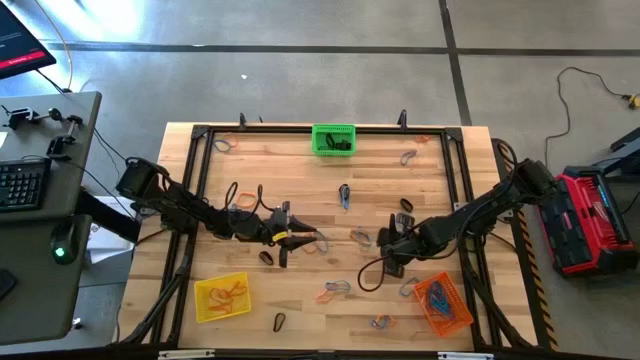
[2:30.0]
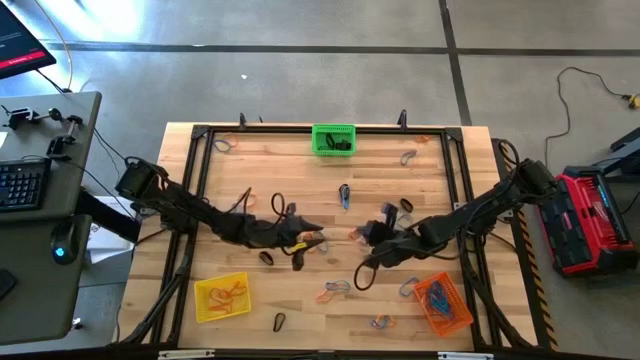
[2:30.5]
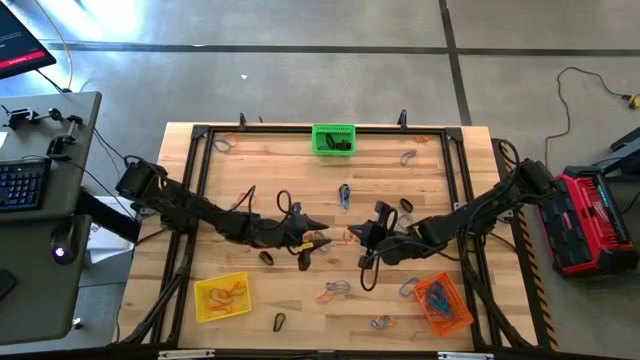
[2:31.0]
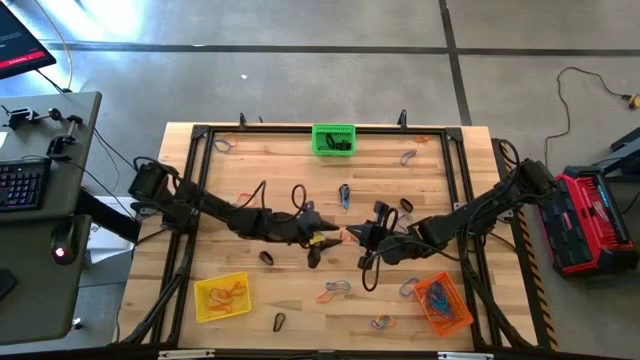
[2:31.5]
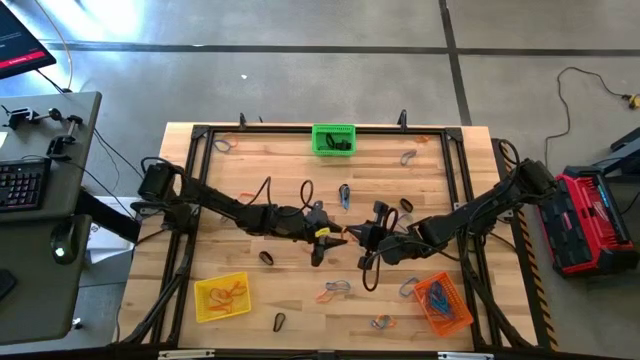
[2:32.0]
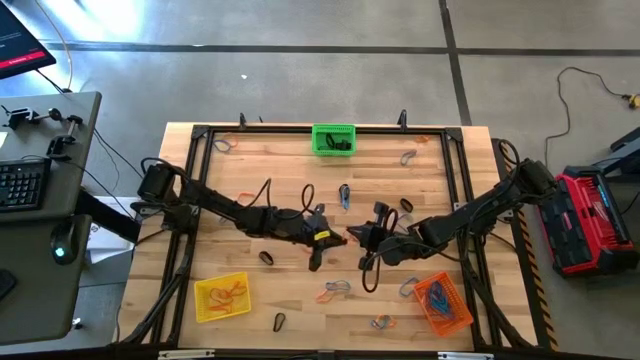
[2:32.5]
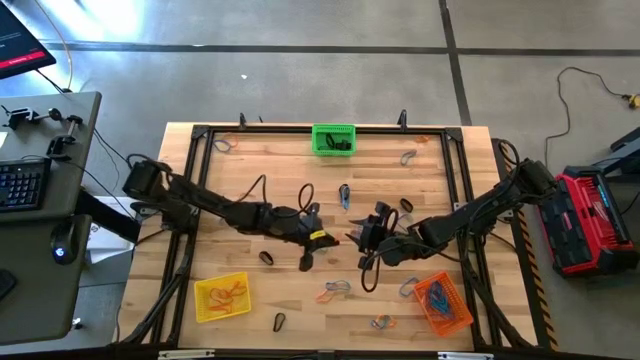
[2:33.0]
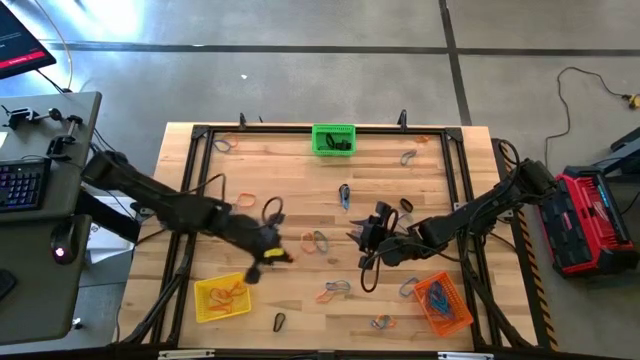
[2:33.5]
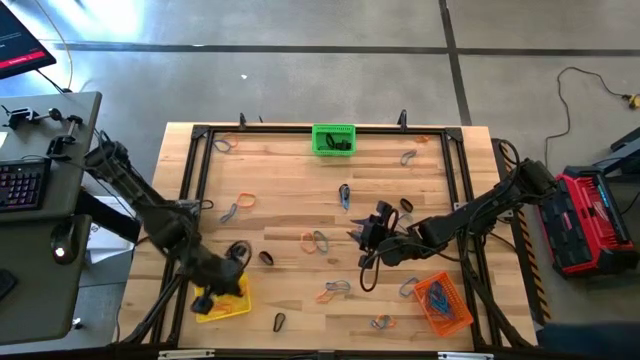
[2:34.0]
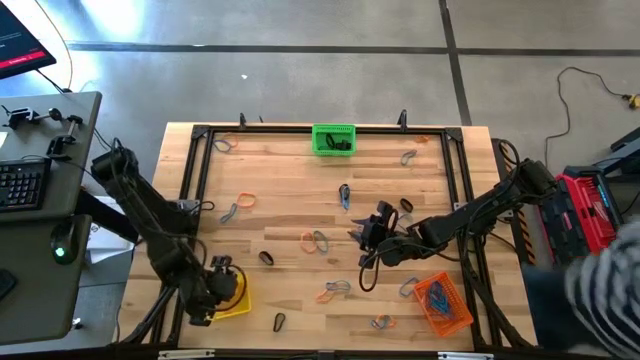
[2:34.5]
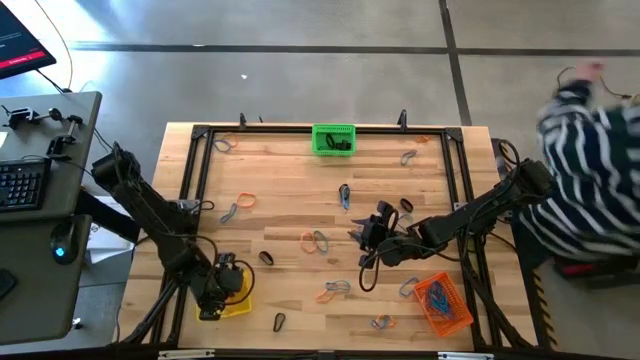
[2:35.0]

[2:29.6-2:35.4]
Task: Sort rubber bands into baskets
Put the orange rubber band into the yellow bin

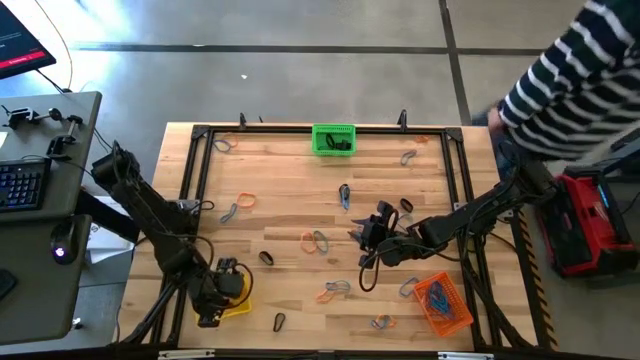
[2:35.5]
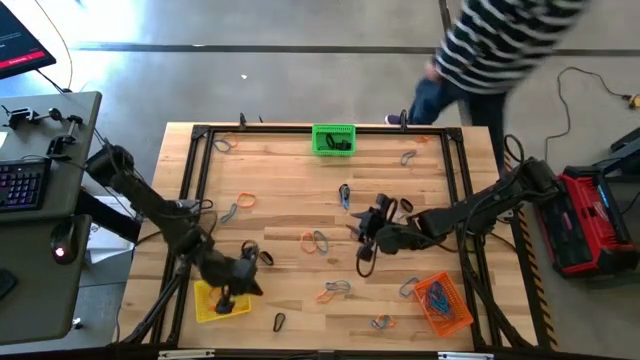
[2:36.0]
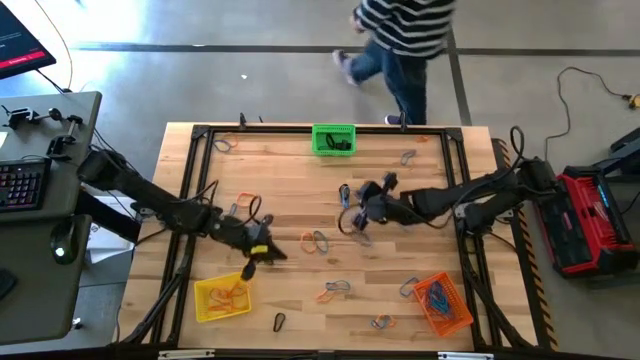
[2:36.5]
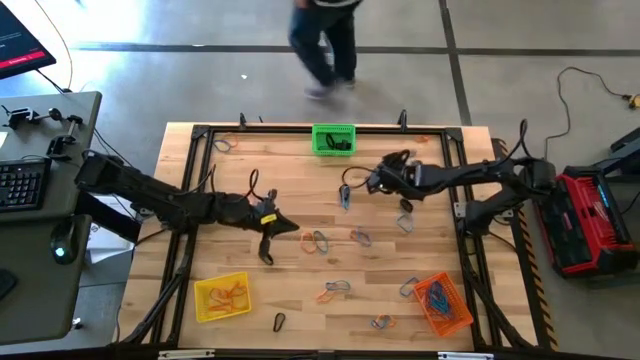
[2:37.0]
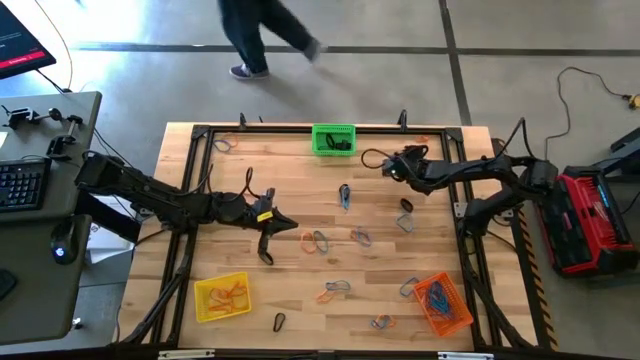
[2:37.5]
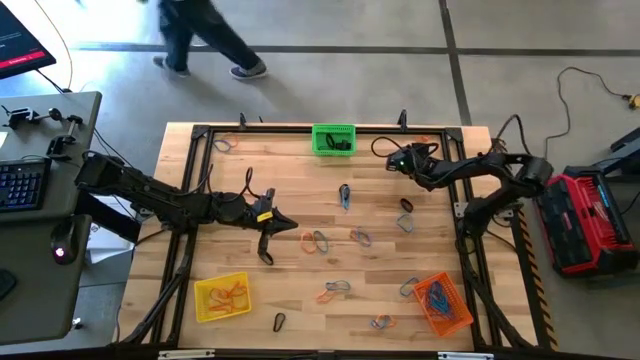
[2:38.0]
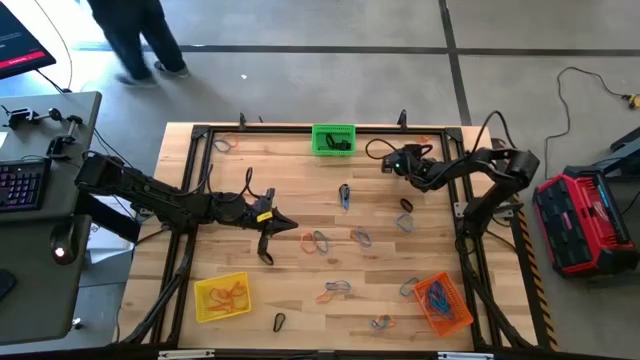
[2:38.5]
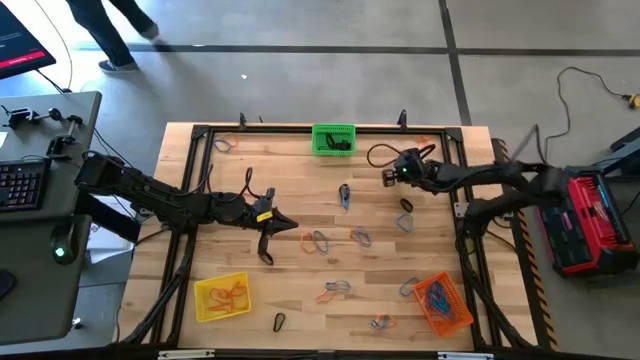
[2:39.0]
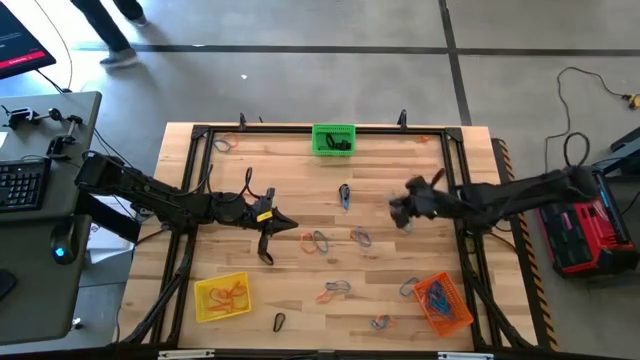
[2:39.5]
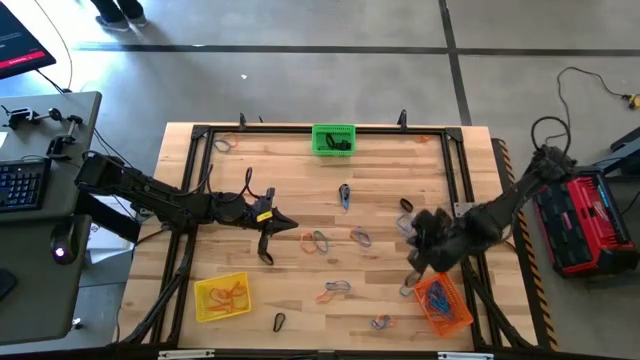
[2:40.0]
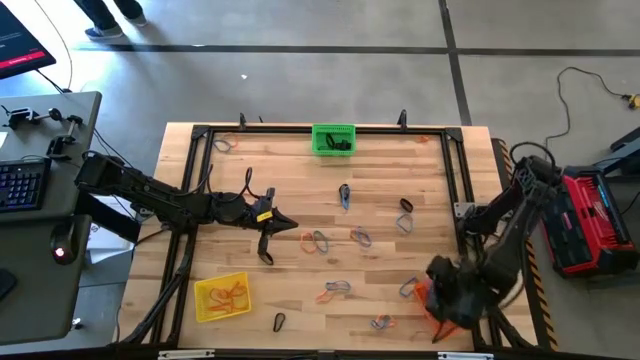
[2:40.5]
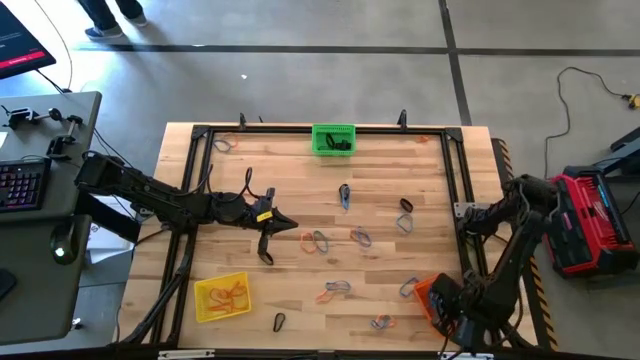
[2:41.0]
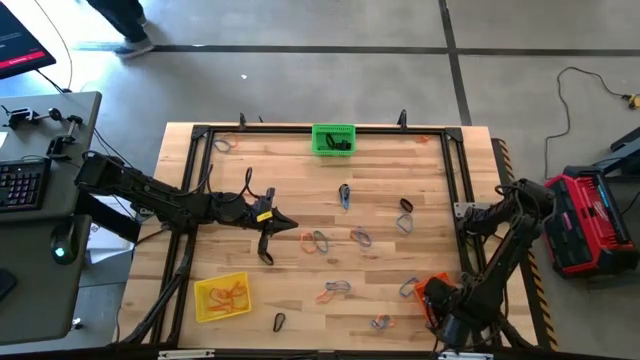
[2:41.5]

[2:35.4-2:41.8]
Put the blue rubber band into the orange bin

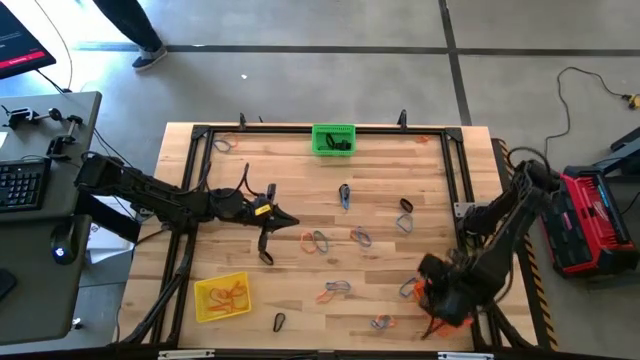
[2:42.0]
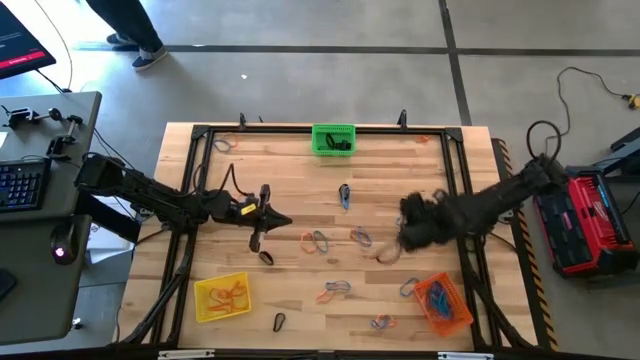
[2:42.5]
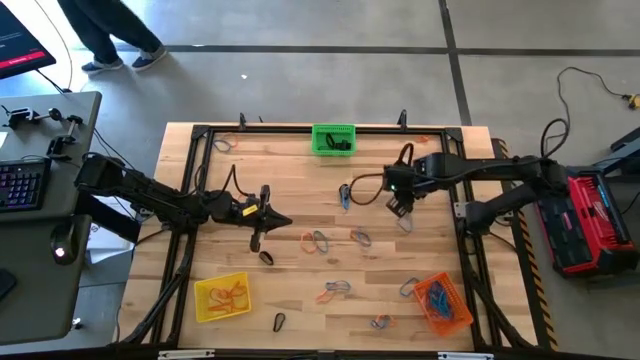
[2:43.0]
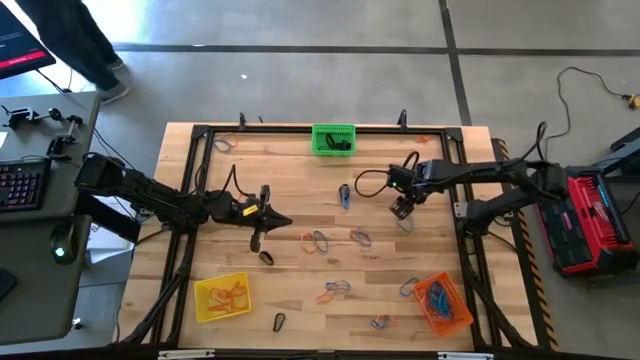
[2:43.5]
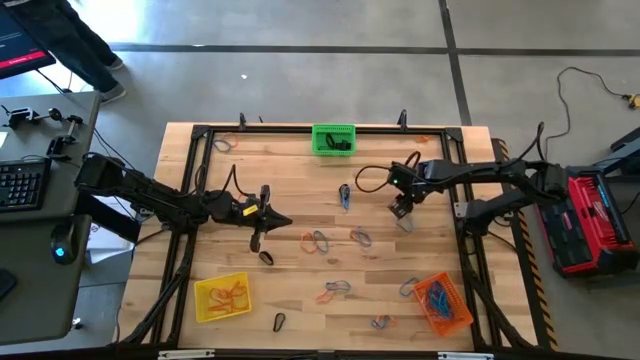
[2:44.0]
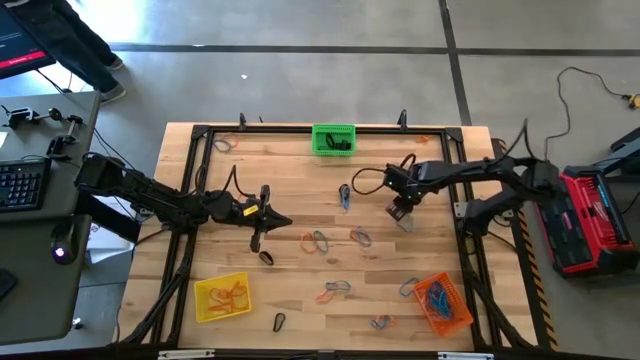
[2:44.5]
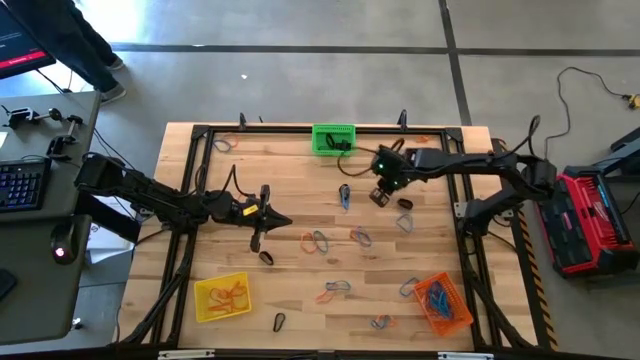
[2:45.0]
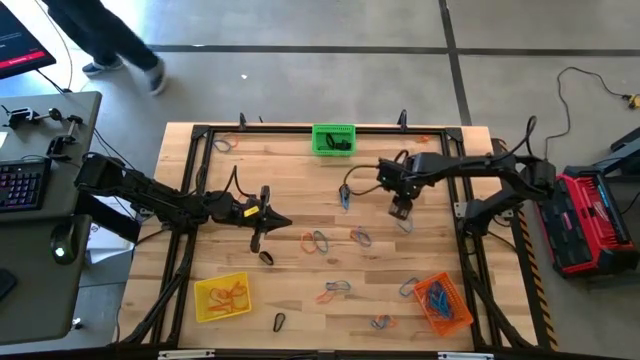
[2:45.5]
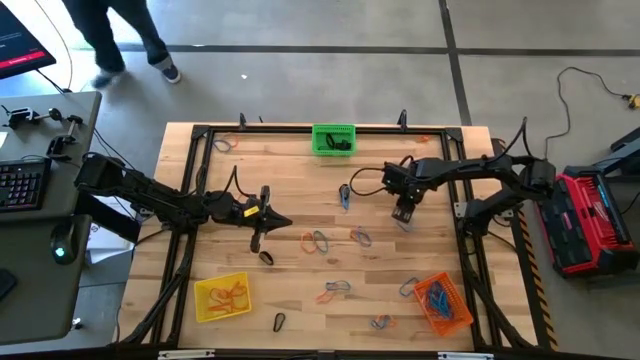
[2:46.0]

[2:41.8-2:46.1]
Put the black rubber band into the green bin

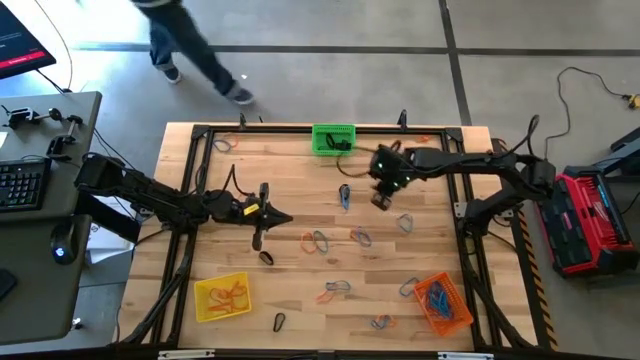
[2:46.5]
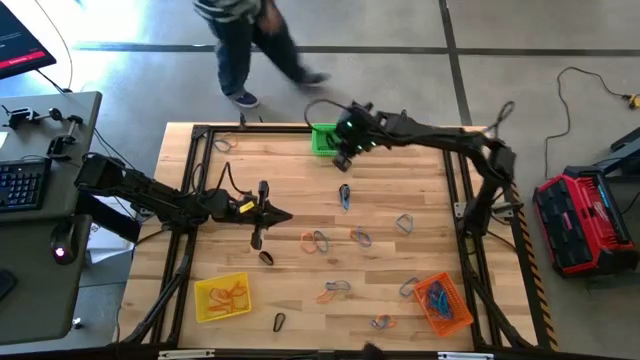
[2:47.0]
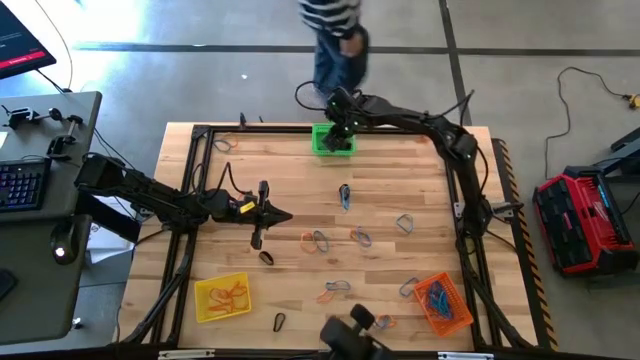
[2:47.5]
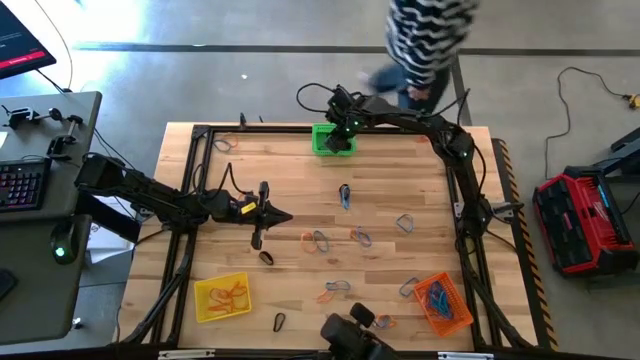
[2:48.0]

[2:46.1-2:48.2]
Put the black rubber band into the green bin

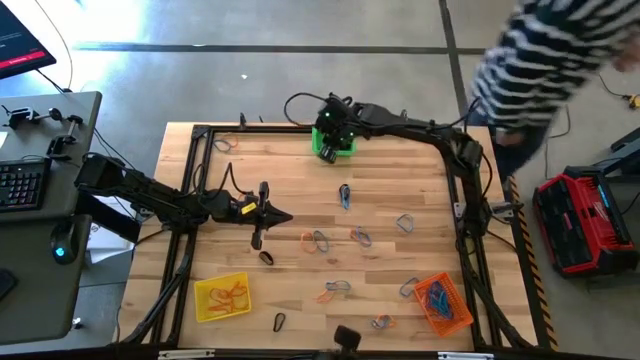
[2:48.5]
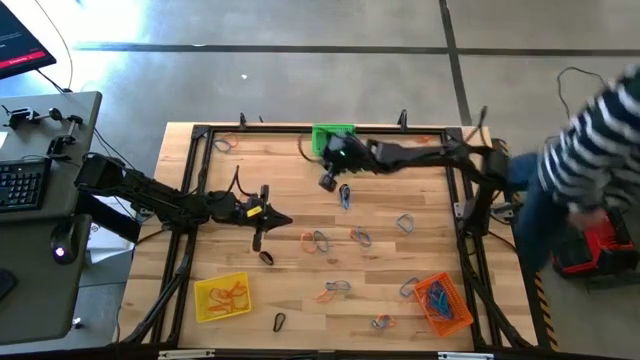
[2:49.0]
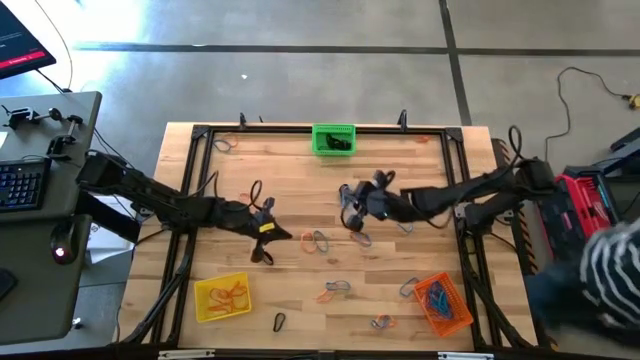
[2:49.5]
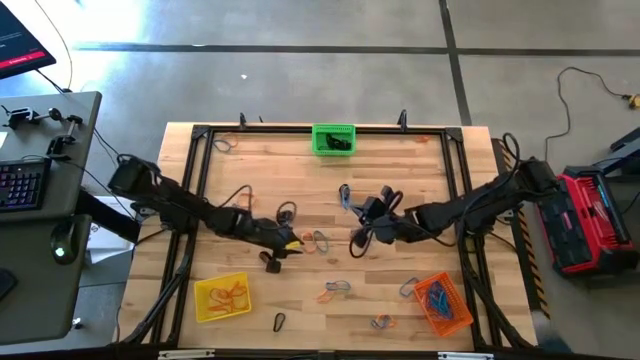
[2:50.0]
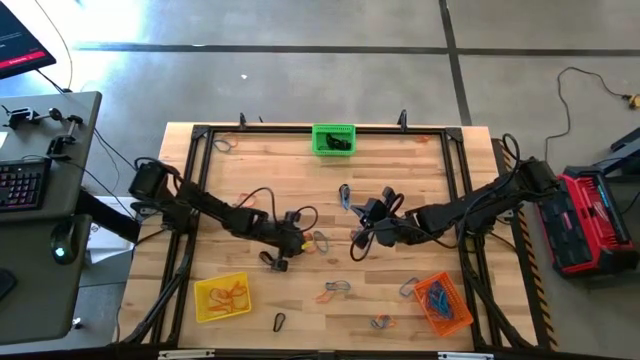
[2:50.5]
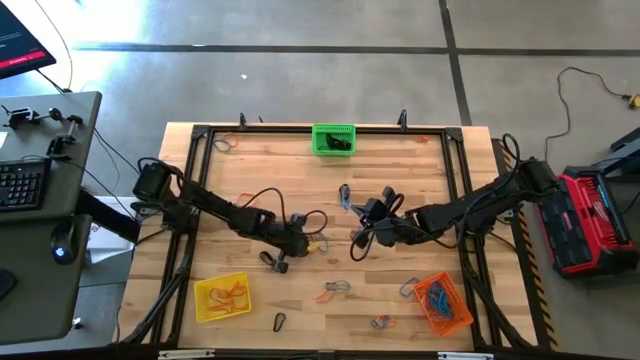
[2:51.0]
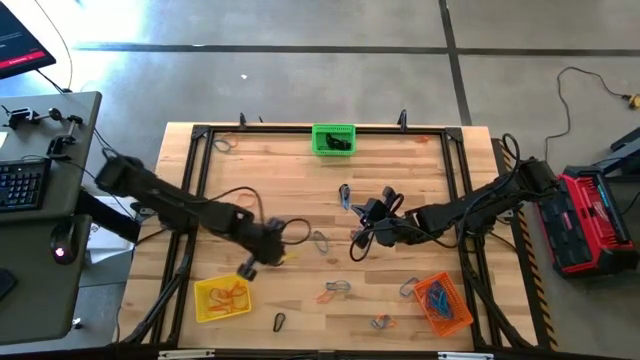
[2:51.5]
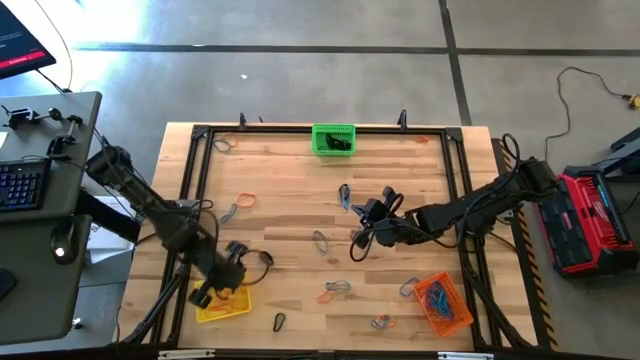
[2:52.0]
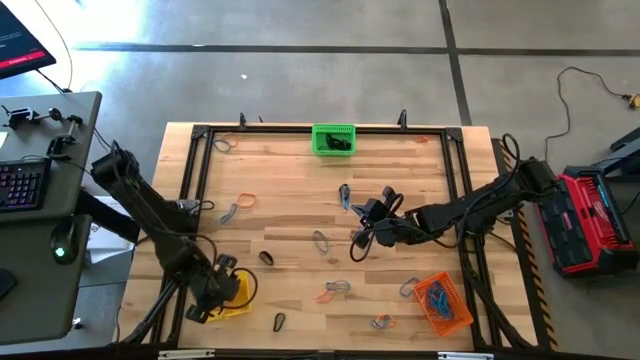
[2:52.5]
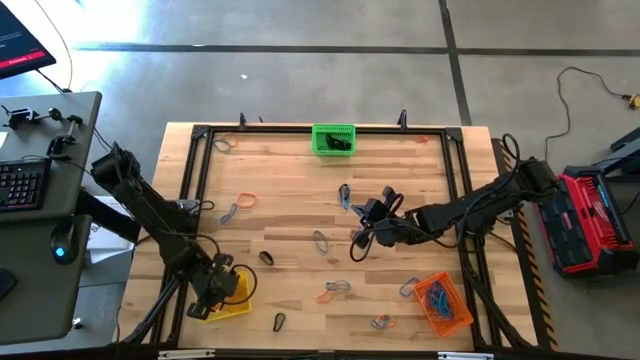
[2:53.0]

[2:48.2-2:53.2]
Put the orange rubber band into the yellow bin
